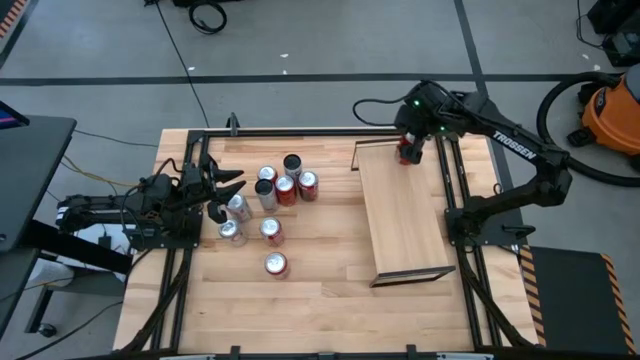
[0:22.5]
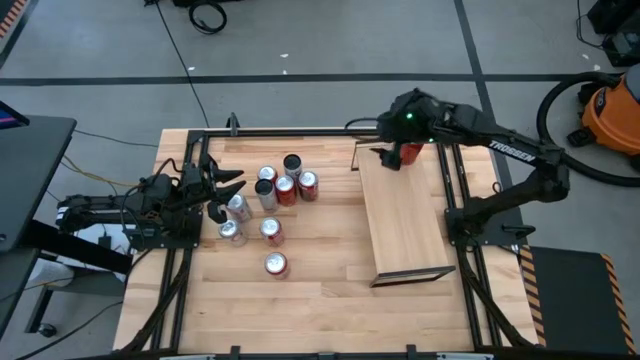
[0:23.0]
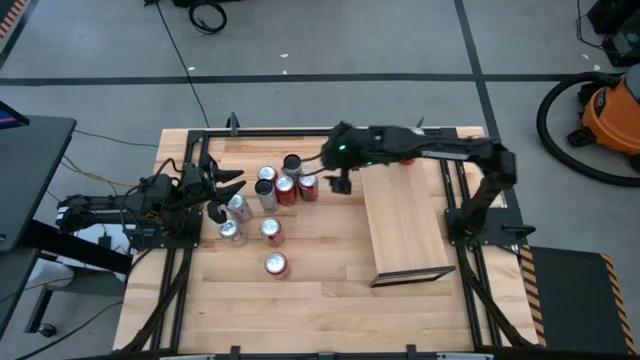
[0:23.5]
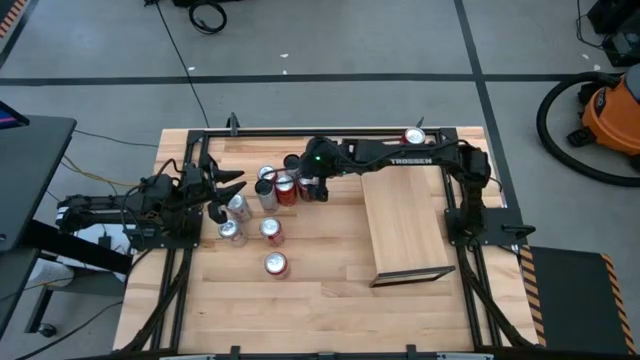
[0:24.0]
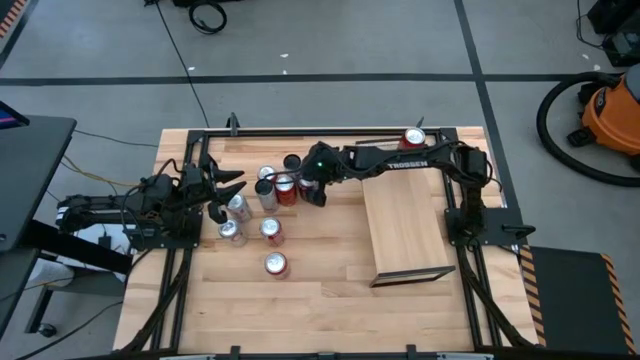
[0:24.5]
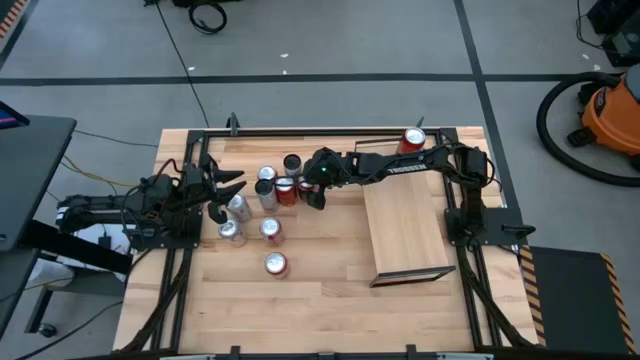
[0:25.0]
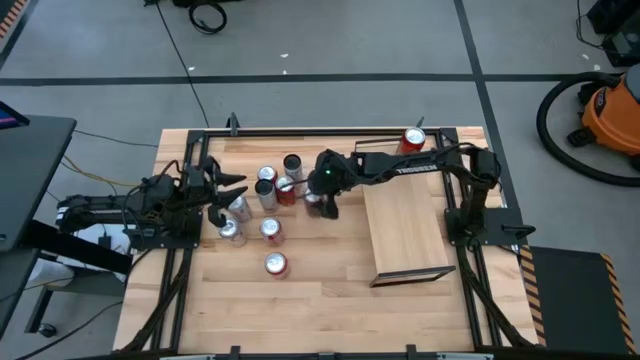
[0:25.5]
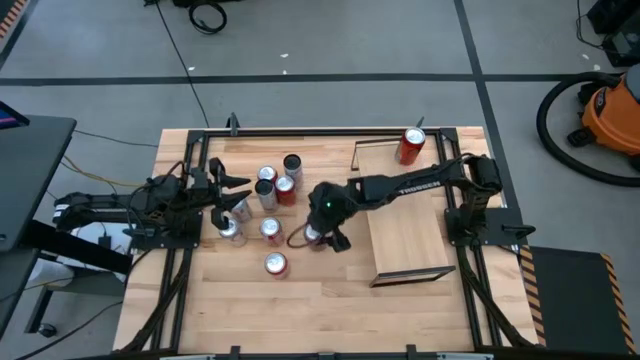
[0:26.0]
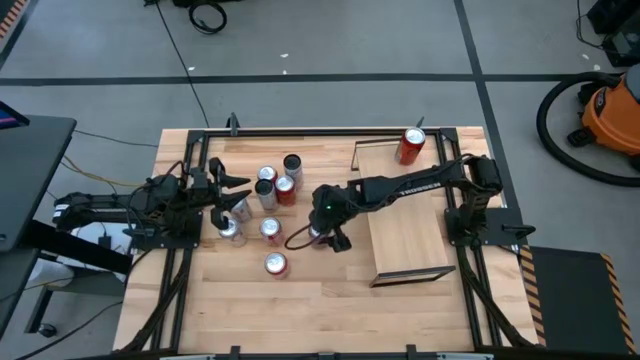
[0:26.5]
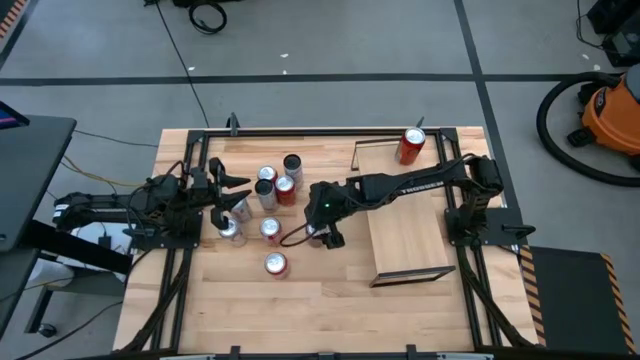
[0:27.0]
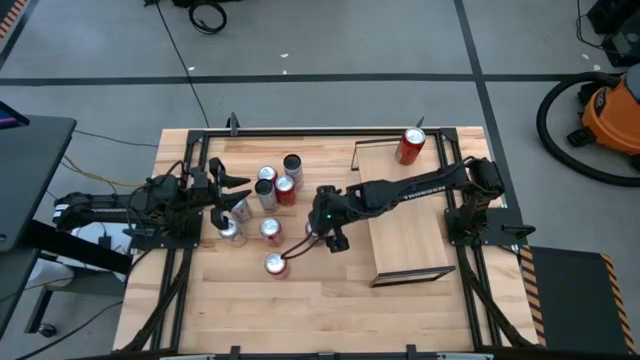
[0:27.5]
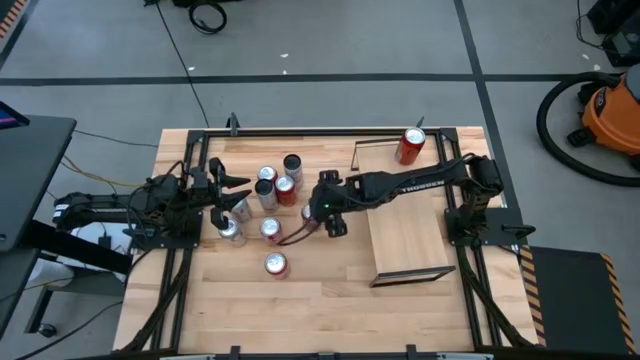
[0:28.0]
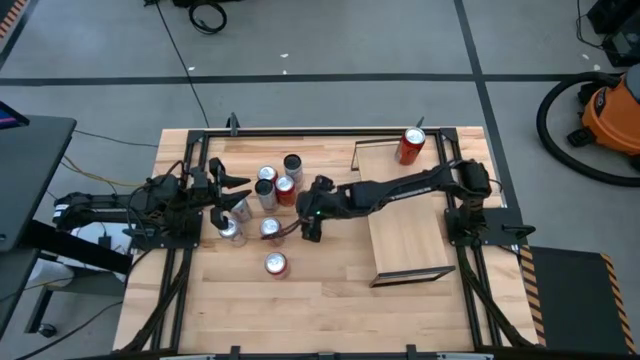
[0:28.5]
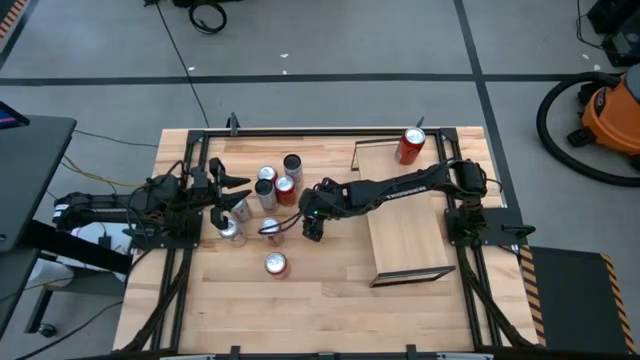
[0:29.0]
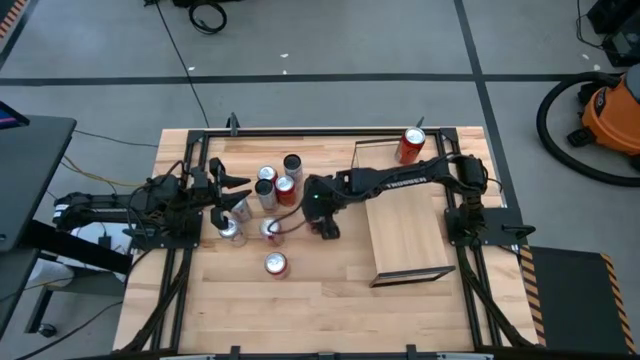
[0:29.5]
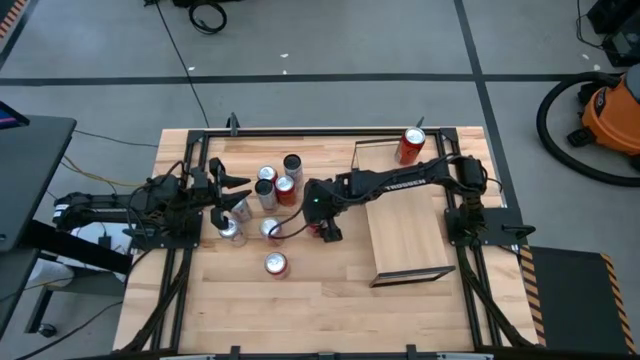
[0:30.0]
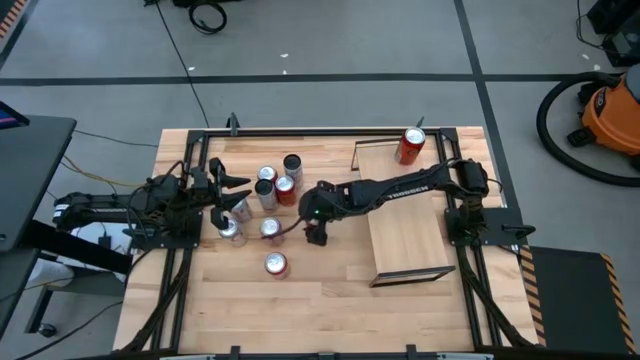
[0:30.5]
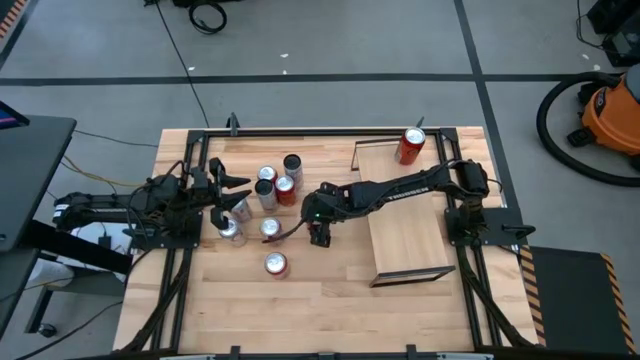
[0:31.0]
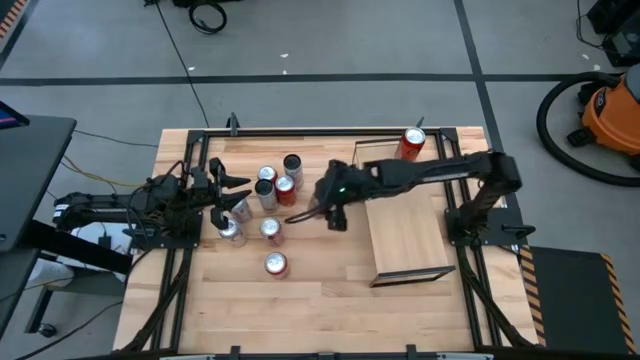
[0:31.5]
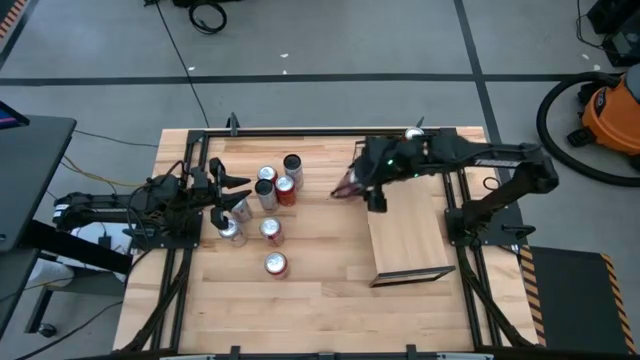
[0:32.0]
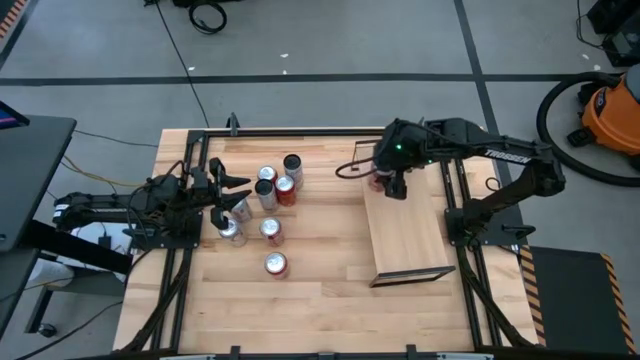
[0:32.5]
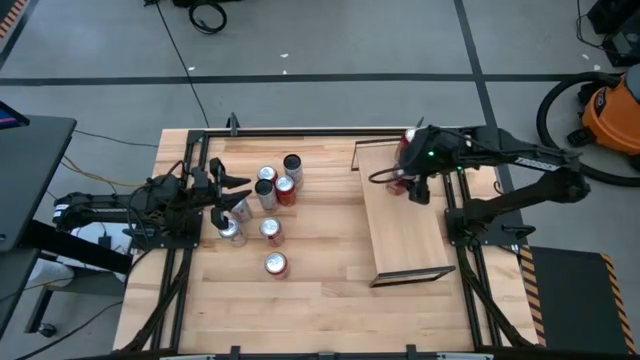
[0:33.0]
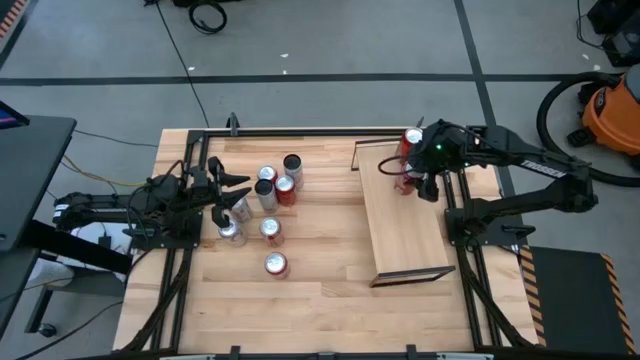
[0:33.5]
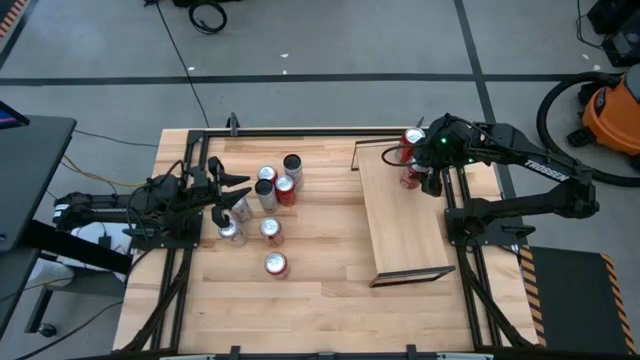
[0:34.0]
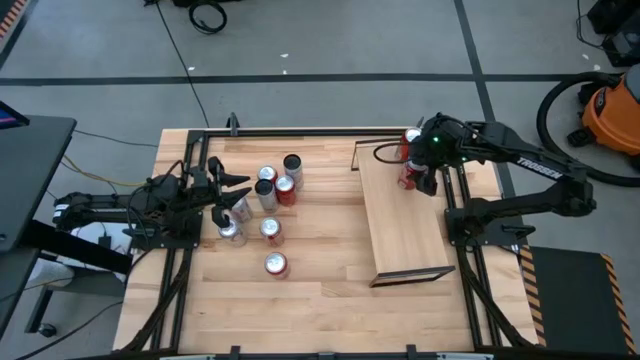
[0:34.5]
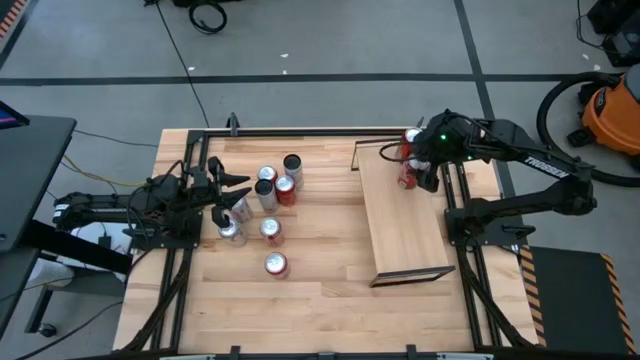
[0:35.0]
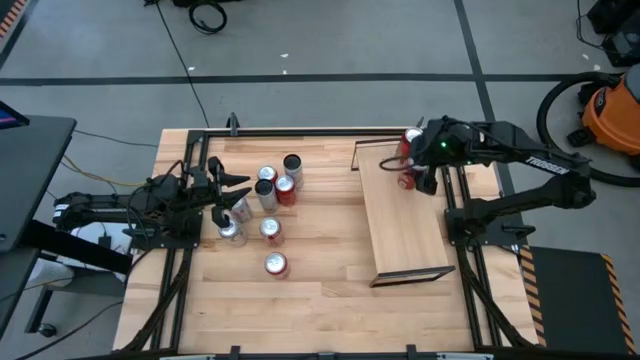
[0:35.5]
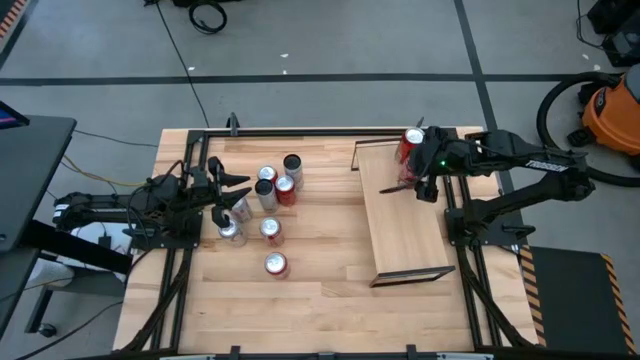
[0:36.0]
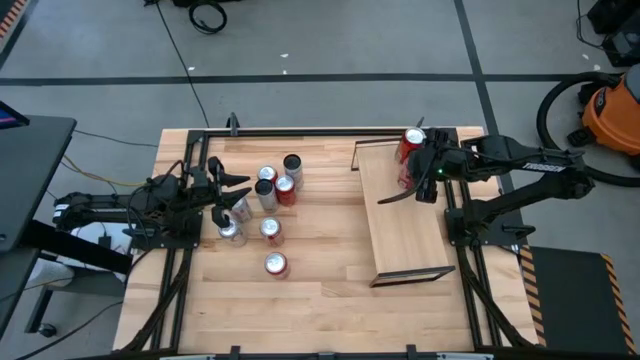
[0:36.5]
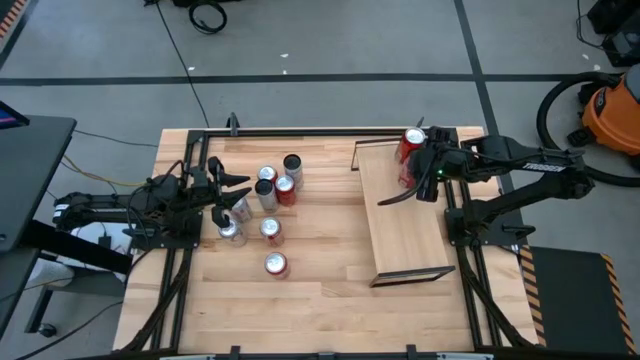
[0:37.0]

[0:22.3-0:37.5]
Task: Place canned beverage on shelf
Put the top red white soda can on the shelf
